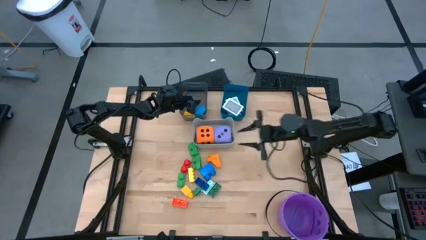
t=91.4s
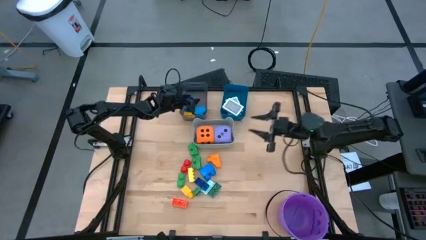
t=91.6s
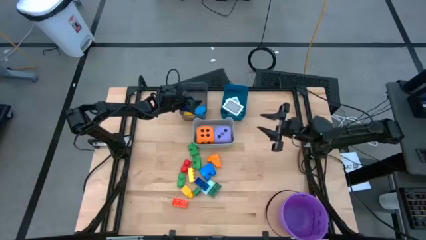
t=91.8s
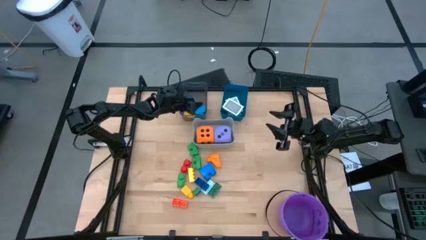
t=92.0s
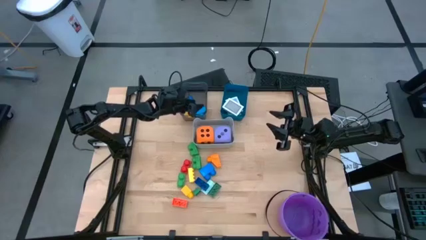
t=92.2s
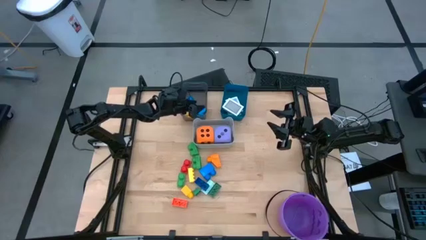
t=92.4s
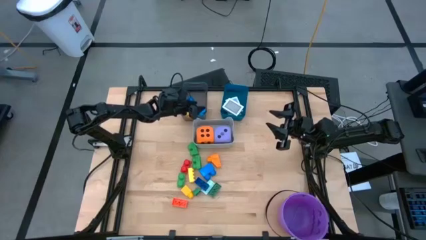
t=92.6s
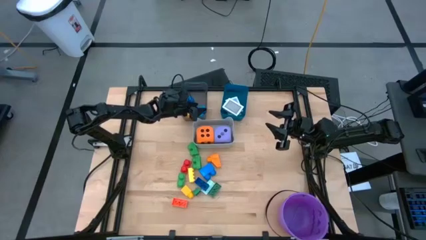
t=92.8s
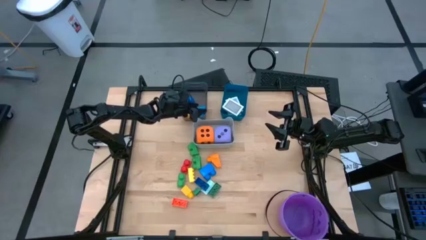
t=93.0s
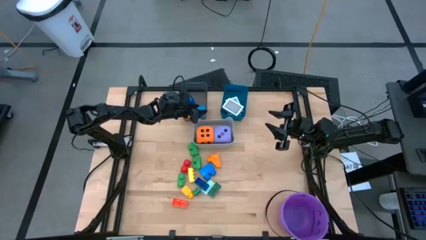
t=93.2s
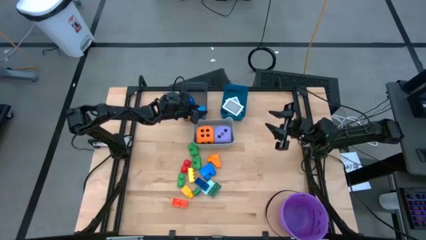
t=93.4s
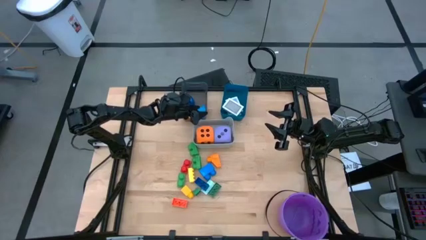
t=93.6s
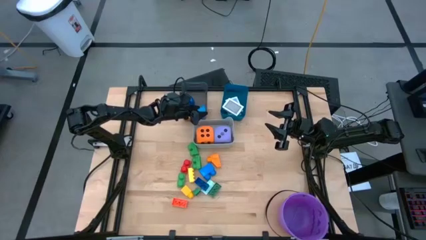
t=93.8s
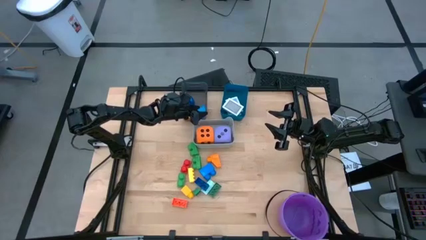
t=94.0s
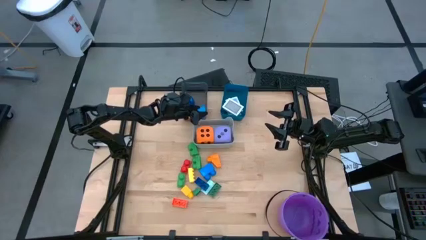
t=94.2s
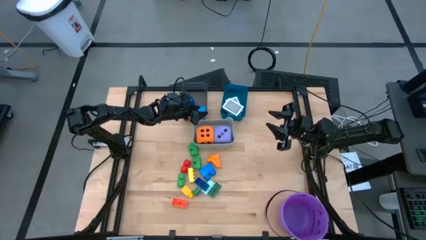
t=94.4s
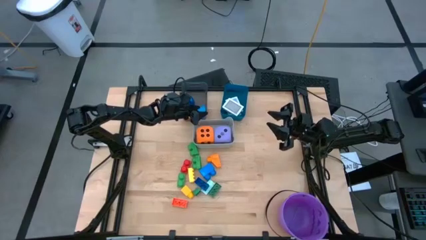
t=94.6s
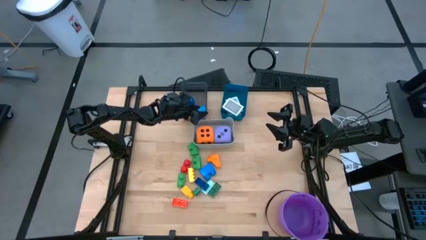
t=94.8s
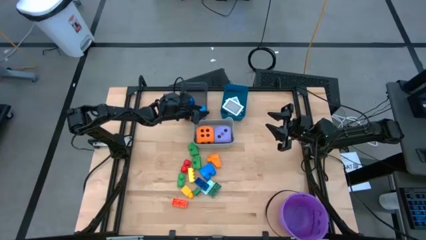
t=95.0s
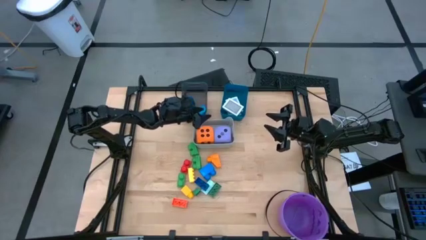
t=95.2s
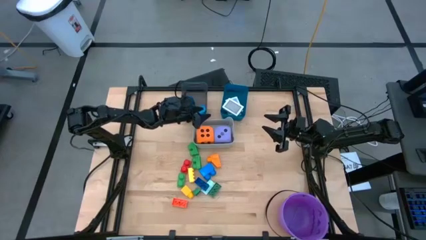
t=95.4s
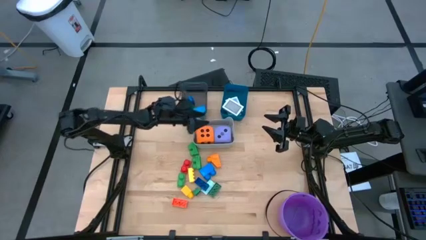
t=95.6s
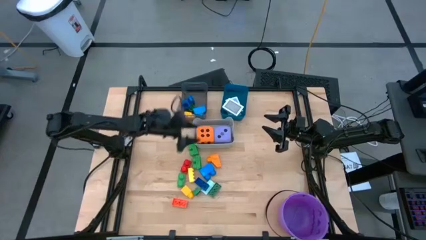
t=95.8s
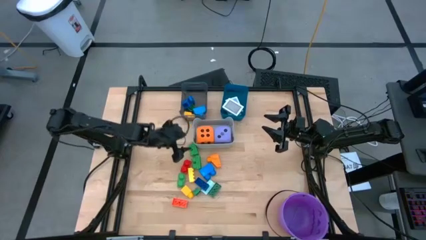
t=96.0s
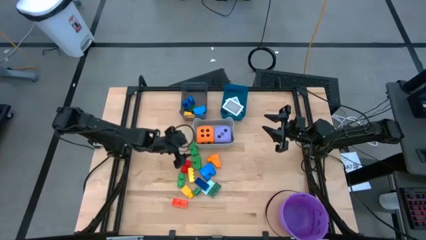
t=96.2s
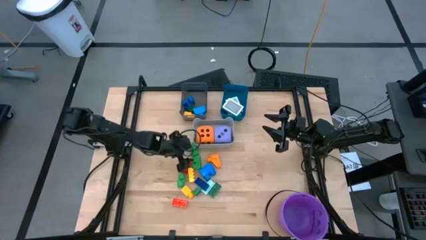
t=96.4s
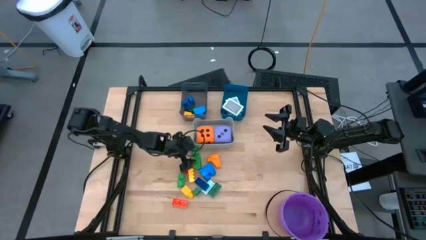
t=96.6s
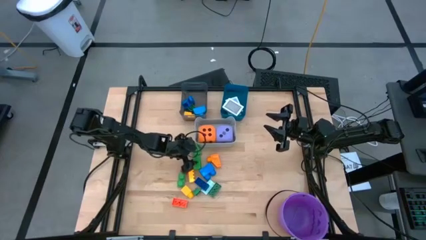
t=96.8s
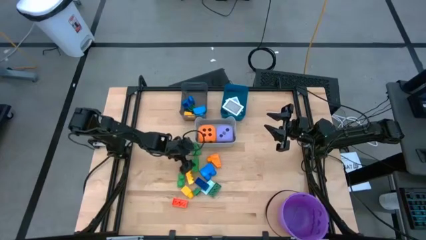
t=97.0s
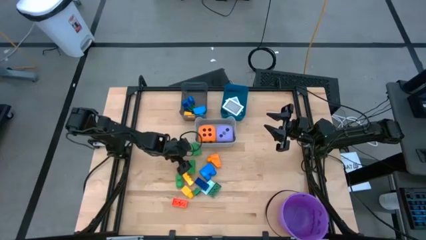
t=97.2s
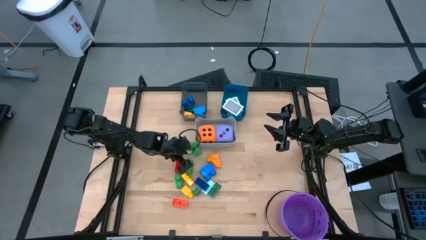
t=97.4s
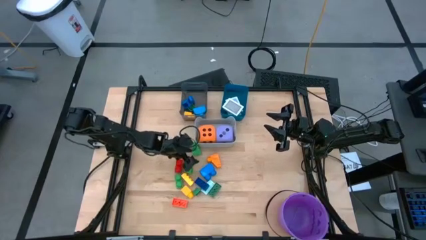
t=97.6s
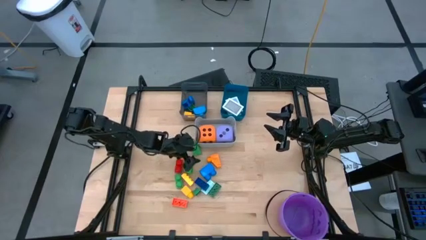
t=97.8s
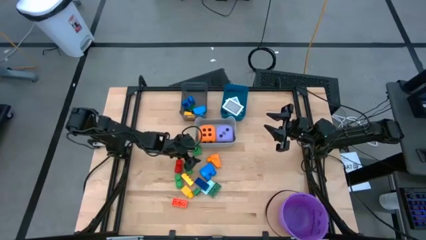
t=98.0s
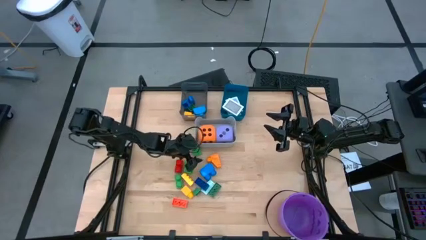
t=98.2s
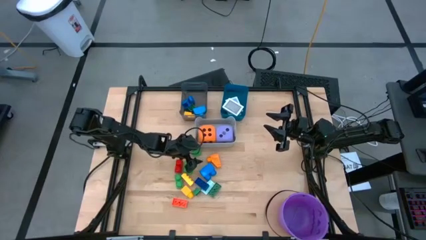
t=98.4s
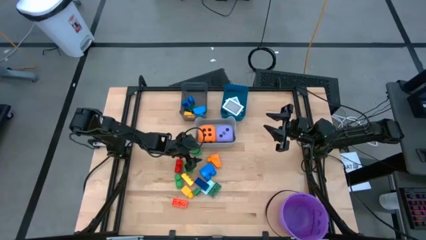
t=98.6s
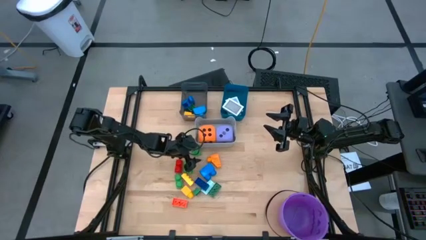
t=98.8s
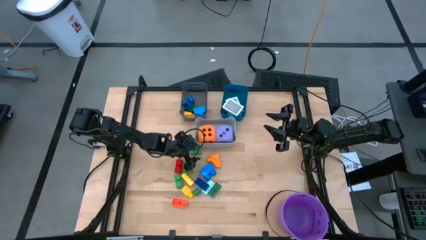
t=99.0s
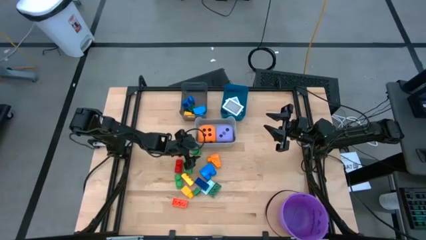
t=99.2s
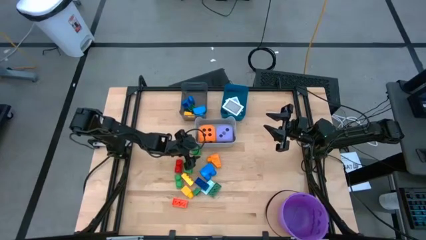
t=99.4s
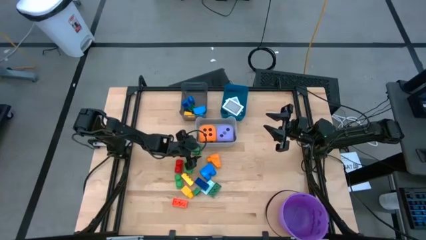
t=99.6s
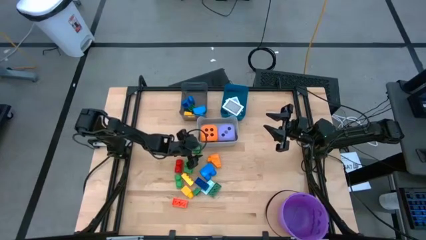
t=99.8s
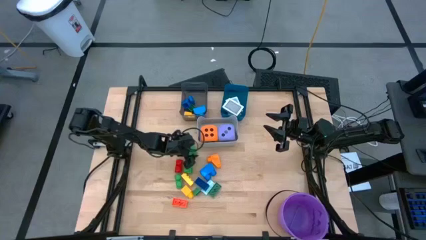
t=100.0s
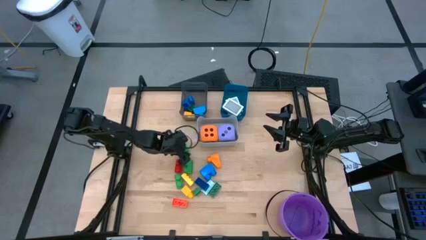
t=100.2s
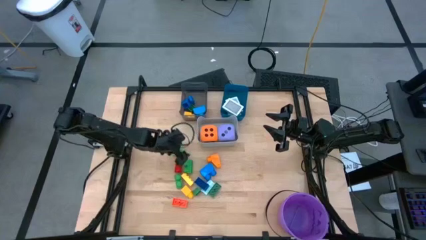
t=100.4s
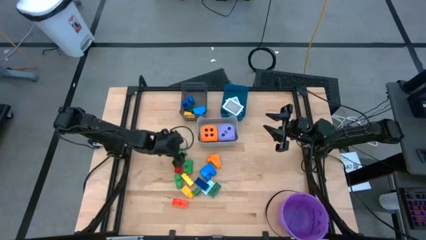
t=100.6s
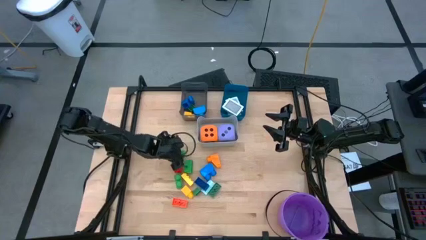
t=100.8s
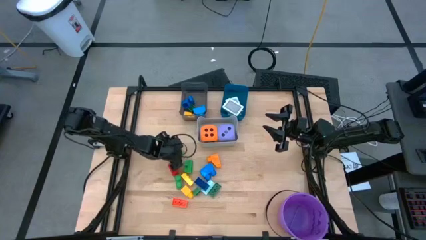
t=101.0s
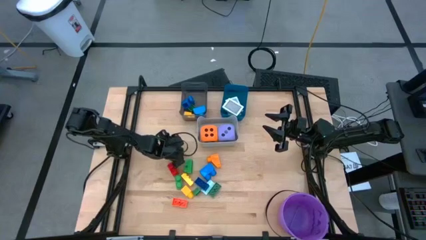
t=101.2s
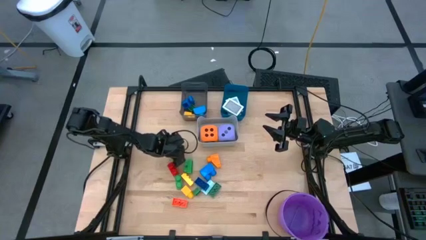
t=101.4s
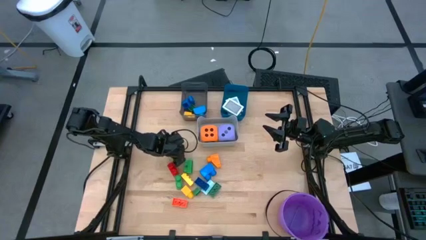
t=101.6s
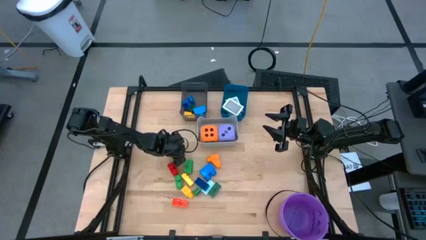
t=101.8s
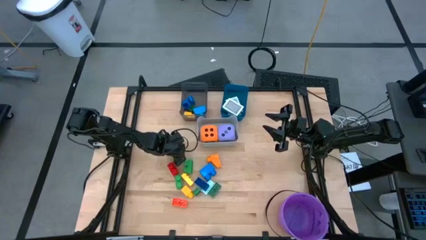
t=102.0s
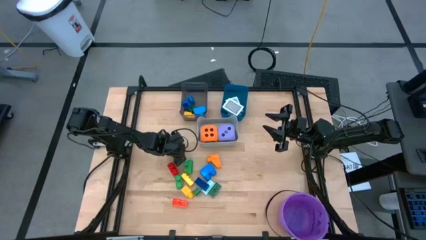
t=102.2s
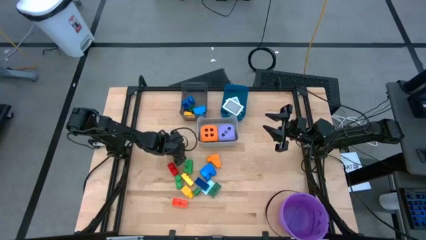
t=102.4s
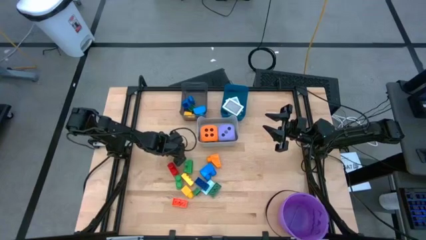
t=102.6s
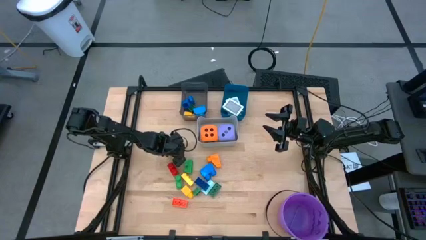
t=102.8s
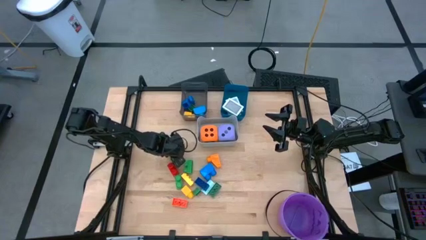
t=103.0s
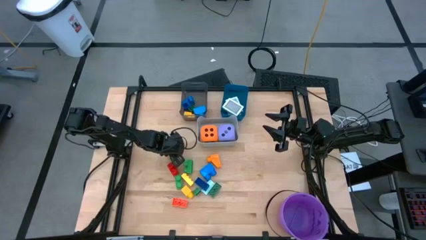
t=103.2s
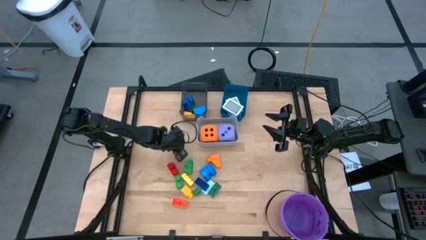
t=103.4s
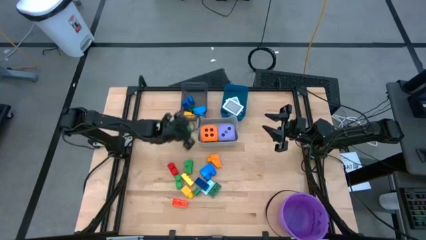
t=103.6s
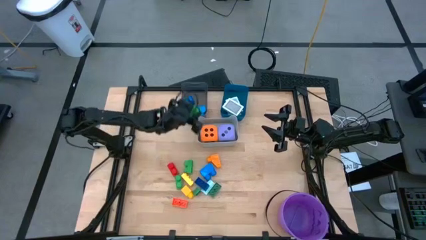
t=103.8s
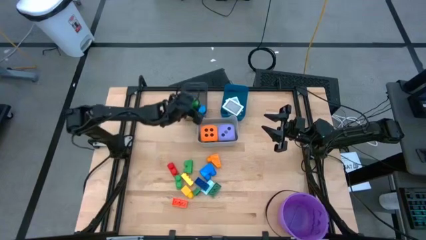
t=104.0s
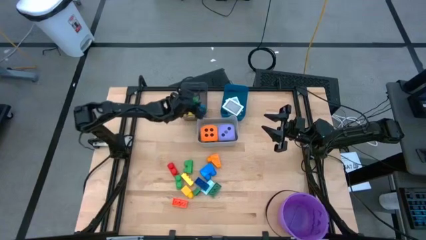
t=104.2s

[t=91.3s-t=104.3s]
Task: Pick & Place Toys
Put the top green game piece into the black bin

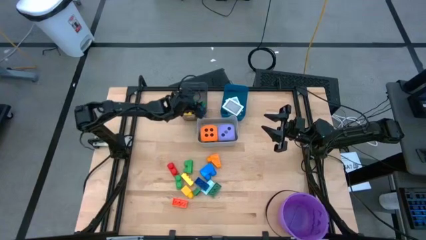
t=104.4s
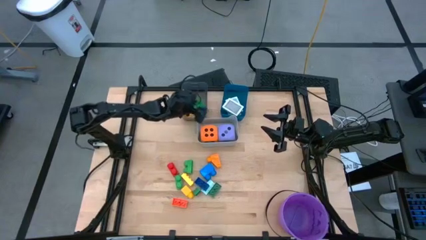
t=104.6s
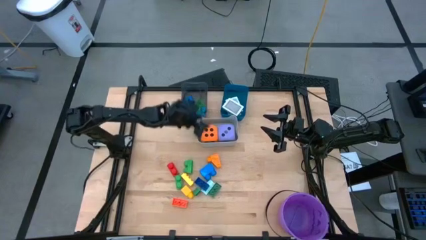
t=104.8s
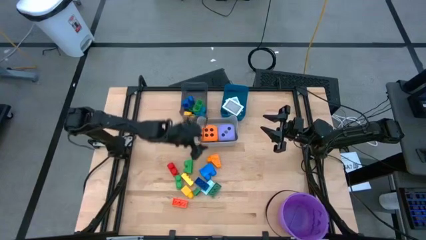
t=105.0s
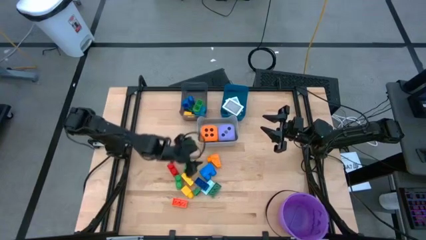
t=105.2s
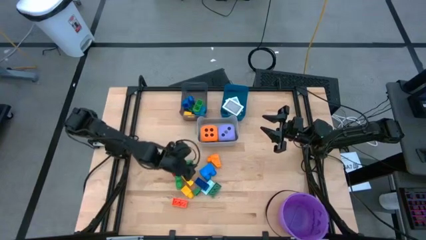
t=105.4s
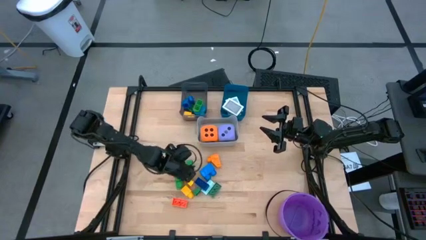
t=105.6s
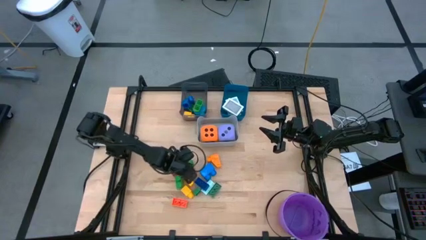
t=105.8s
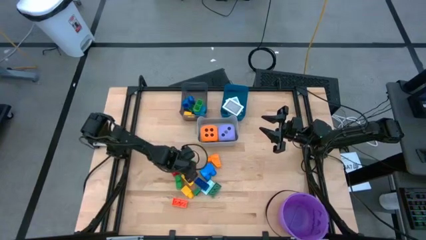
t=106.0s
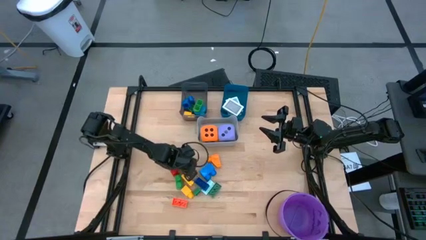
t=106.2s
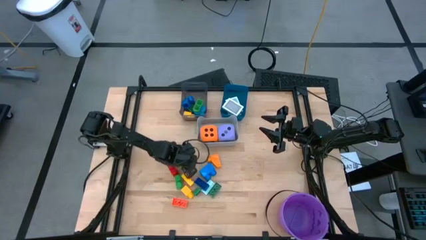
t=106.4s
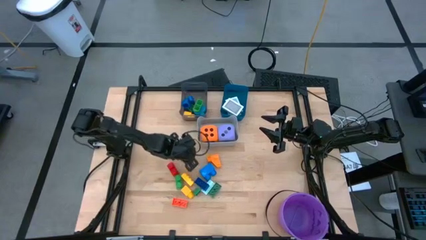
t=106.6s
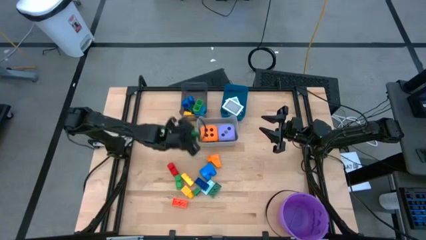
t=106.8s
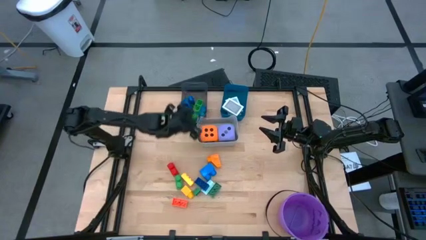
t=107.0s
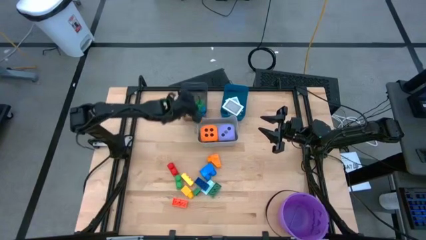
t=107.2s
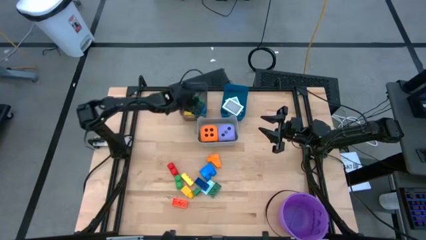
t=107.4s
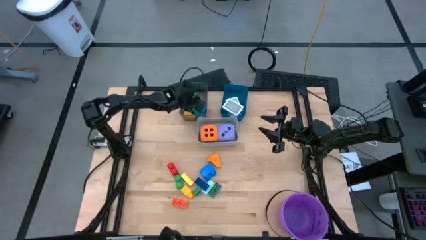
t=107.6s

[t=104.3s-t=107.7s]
Put the top green piece into the black bin
